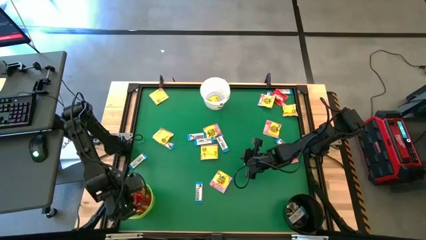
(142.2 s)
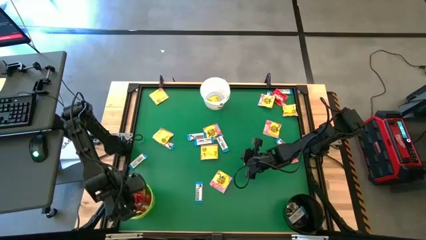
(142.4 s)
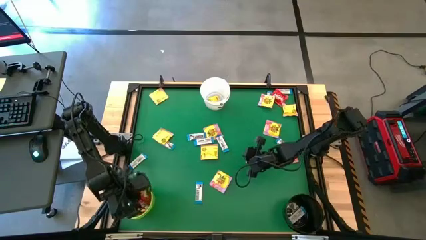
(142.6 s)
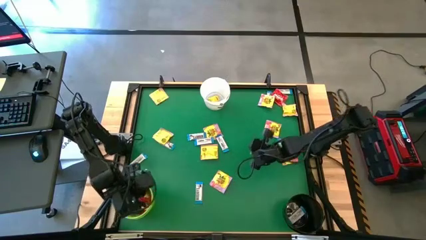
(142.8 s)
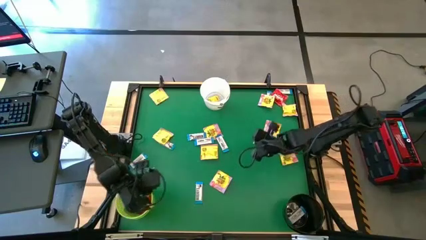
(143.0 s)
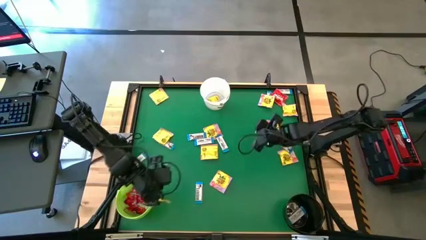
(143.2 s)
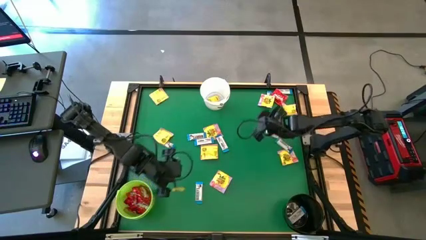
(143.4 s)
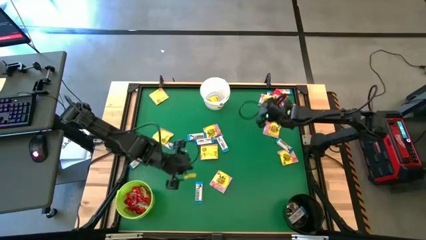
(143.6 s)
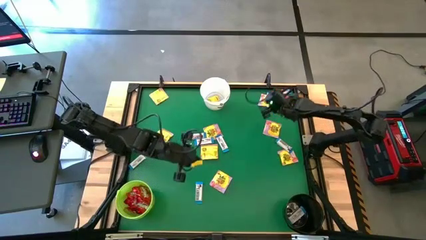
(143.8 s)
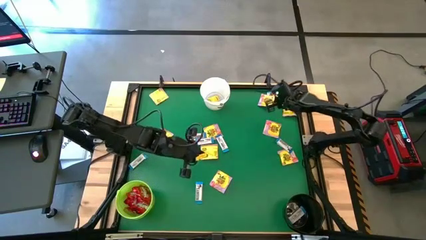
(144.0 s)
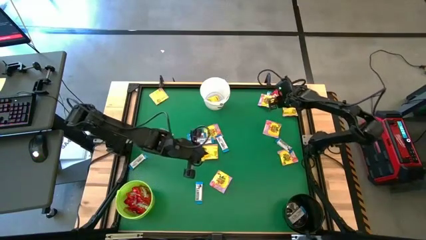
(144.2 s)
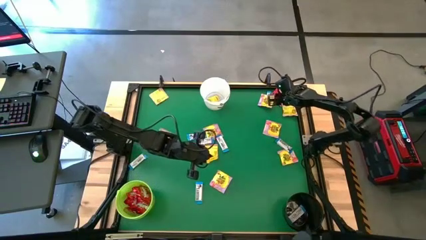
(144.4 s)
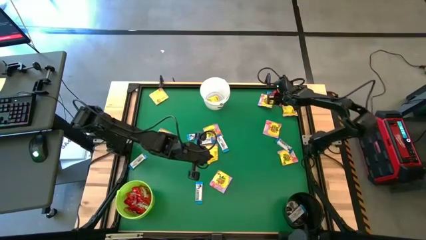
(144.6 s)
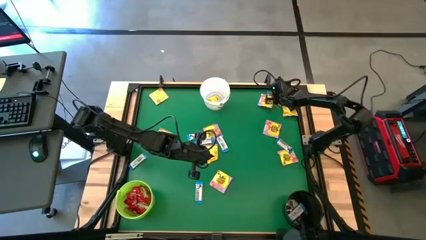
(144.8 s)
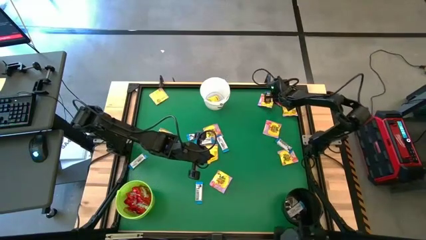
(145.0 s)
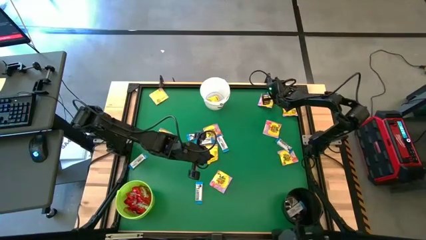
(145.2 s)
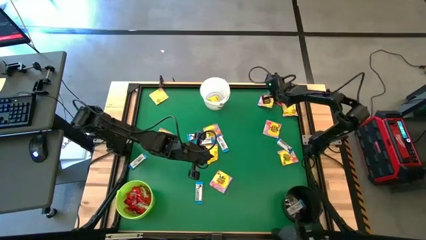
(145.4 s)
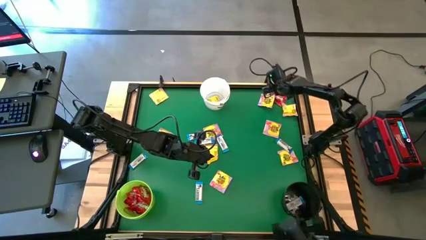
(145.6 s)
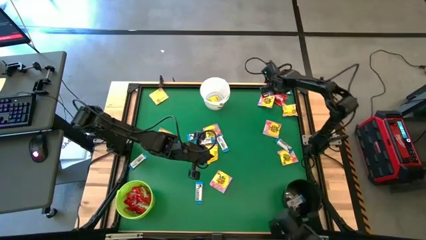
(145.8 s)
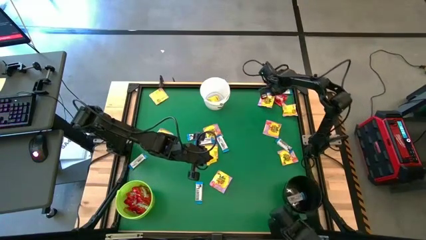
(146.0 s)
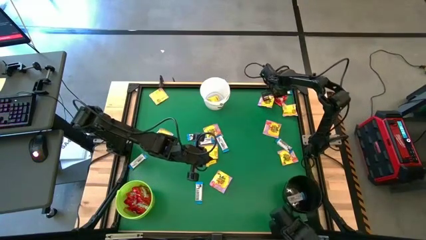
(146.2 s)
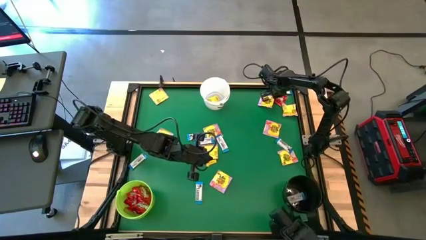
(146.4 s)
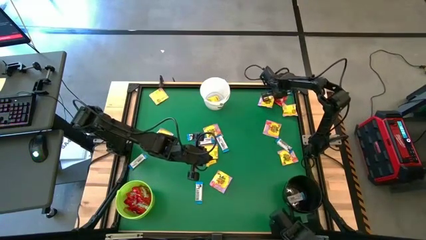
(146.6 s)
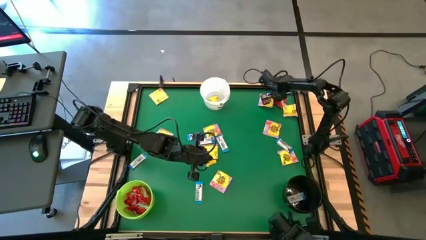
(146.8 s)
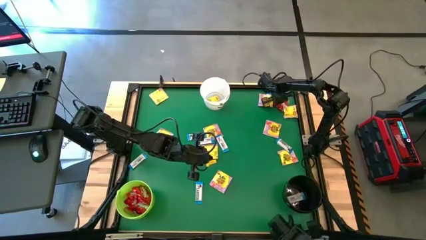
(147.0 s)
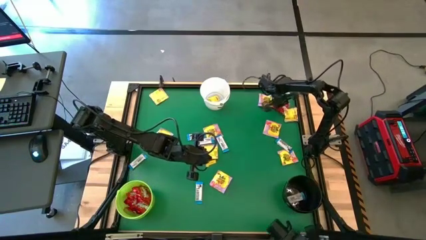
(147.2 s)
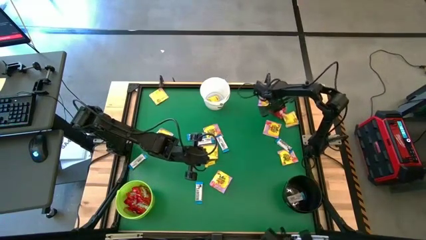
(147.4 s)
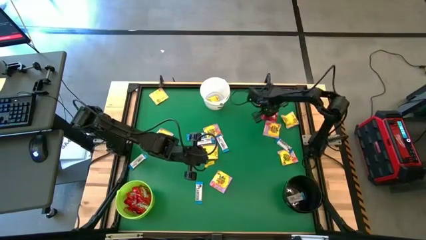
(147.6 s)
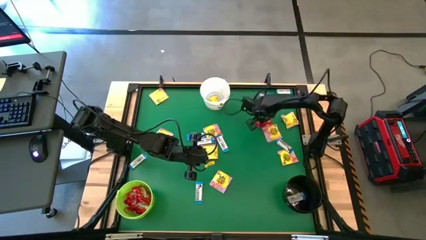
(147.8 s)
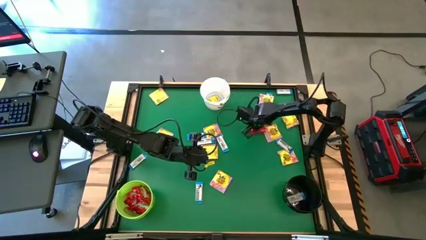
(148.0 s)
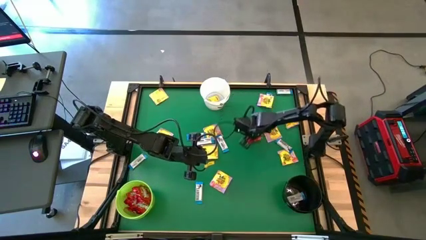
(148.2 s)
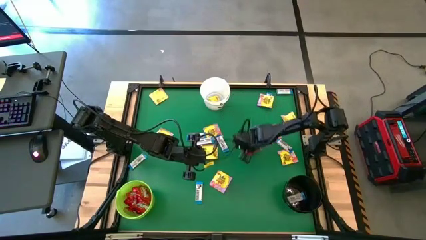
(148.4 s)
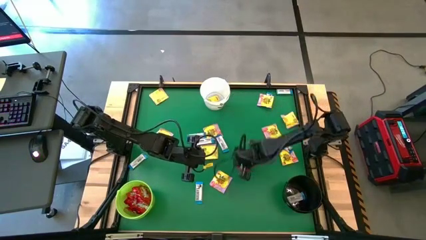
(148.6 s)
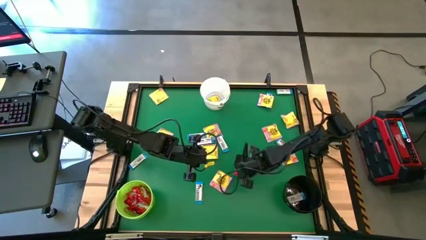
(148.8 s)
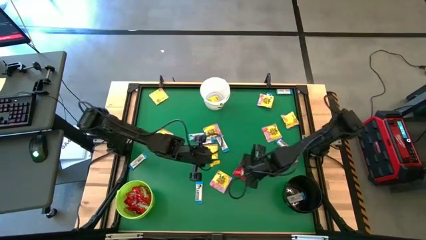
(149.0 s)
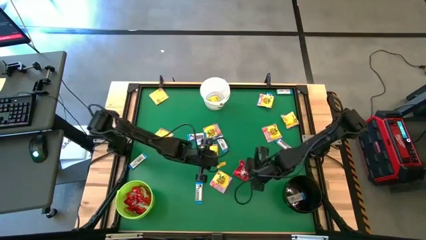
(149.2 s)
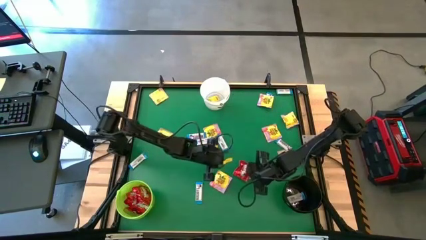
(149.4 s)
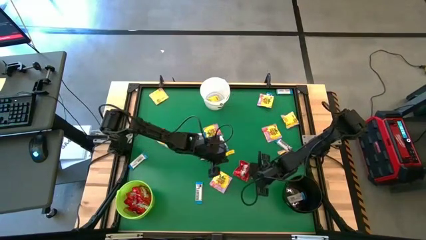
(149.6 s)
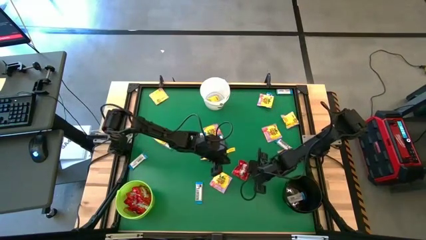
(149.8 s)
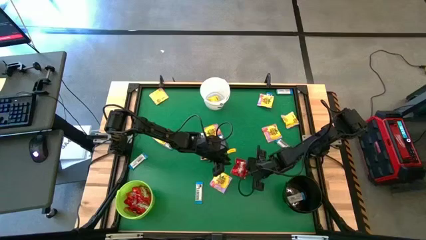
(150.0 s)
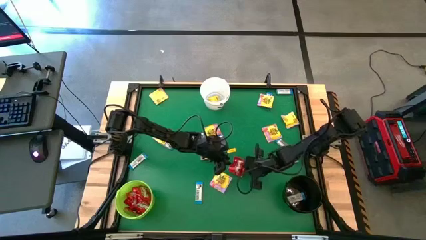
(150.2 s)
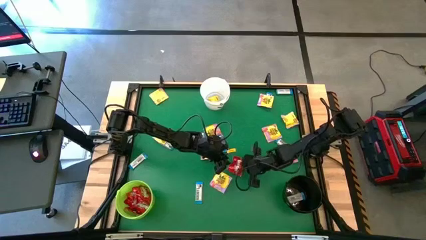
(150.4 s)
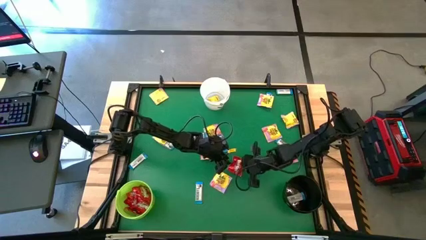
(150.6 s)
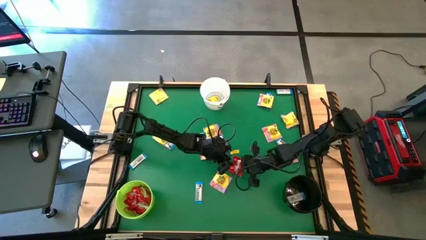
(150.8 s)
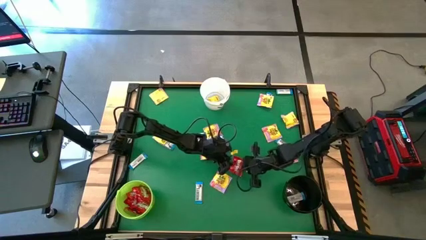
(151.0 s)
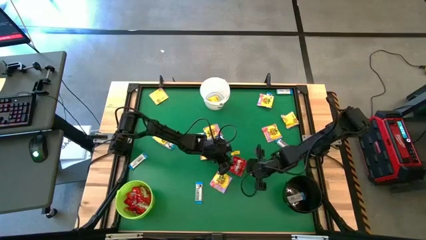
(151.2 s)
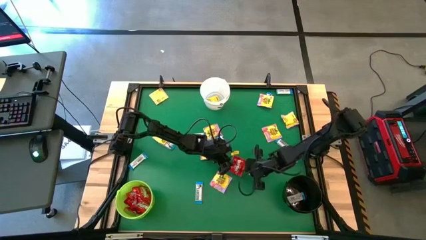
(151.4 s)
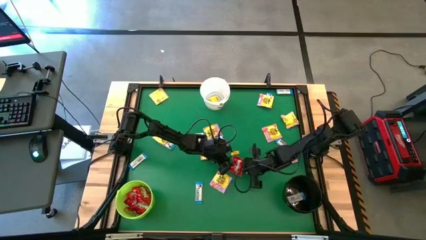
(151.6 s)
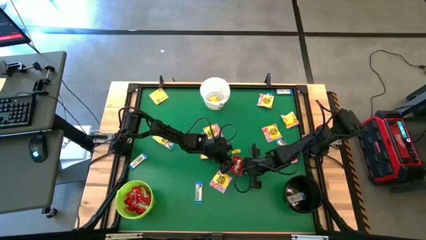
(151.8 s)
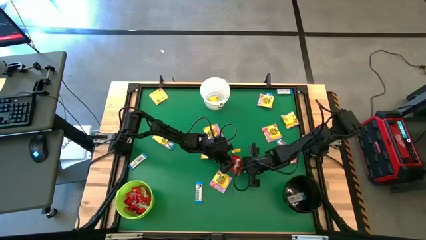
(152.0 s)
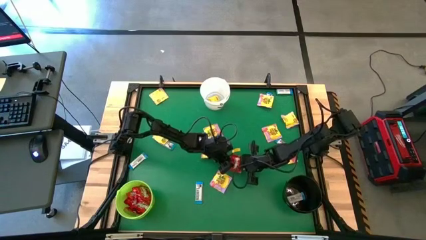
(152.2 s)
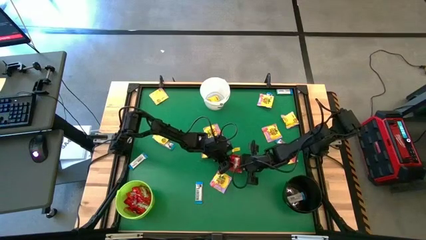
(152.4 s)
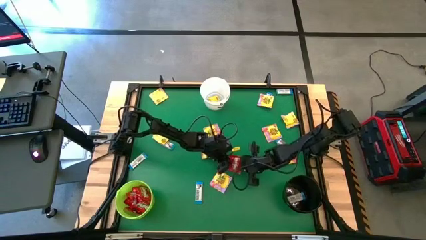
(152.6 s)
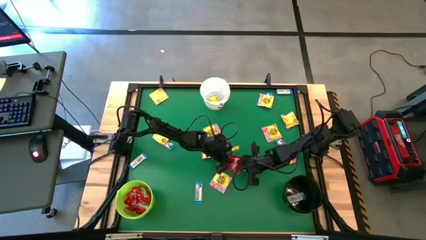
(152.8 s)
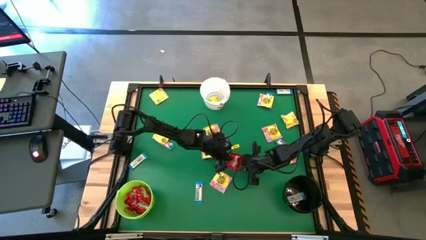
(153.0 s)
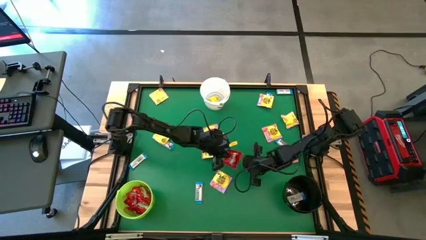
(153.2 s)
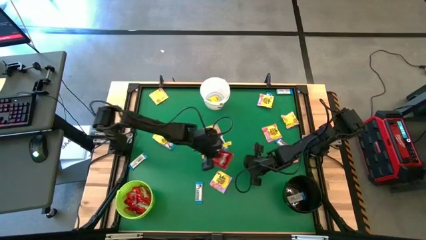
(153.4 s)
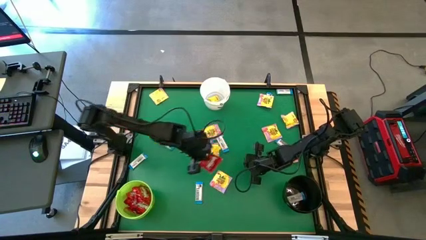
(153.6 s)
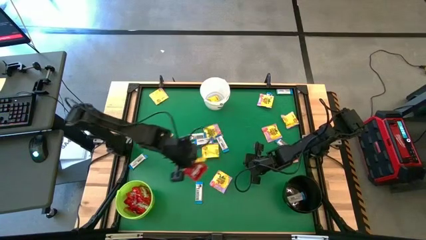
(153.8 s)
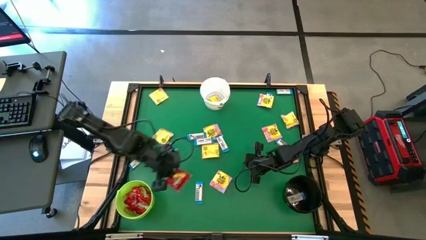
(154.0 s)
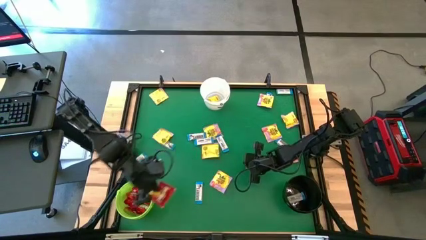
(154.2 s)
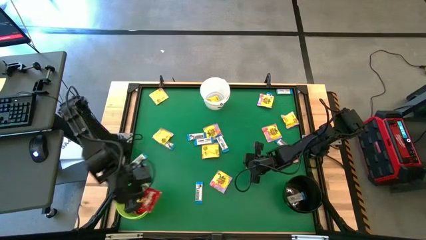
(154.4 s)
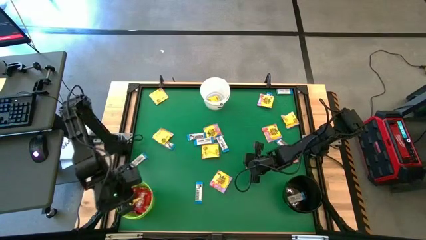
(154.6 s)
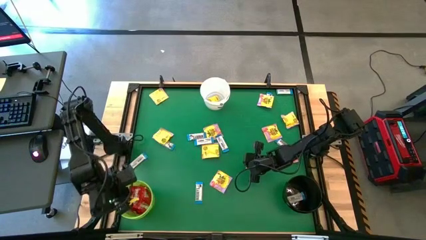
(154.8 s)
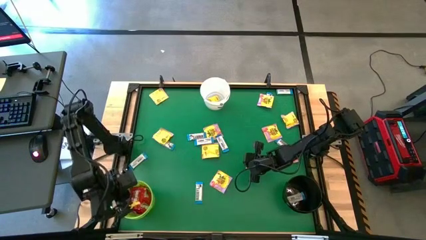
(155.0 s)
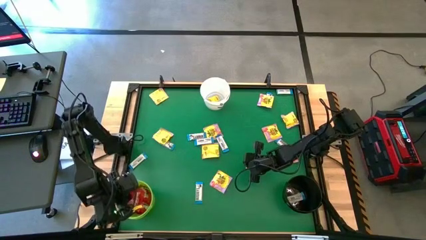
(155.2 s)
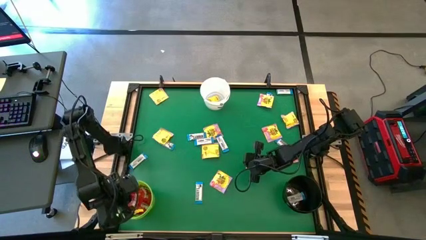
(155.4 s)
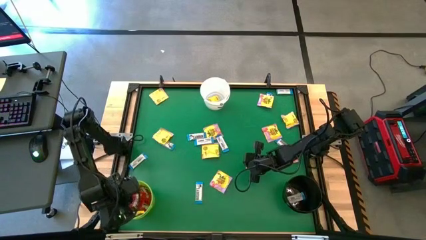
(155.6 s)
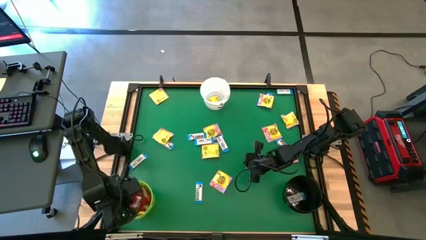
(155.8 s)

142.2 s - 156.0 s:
Task: Sort candy by brand, put in halloween buckets
Put the red candy into the green bucket

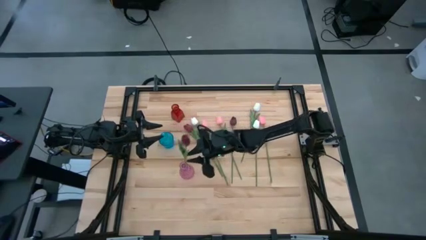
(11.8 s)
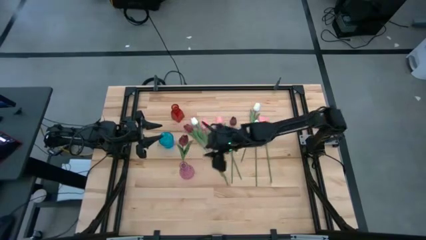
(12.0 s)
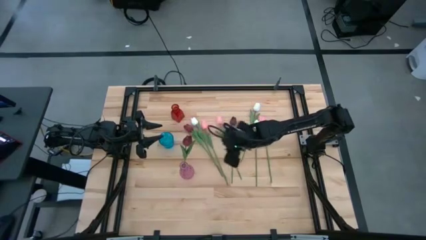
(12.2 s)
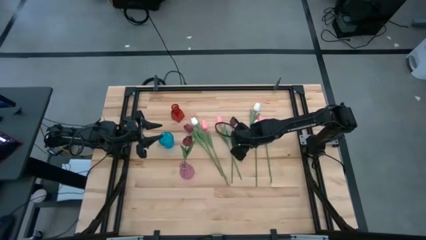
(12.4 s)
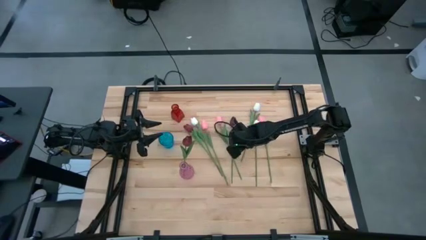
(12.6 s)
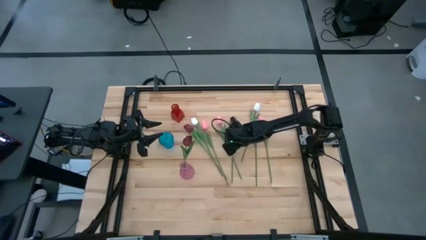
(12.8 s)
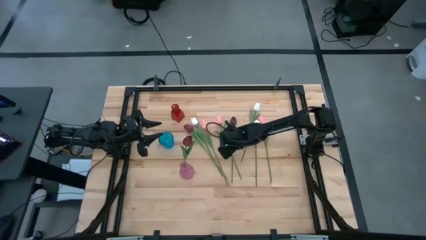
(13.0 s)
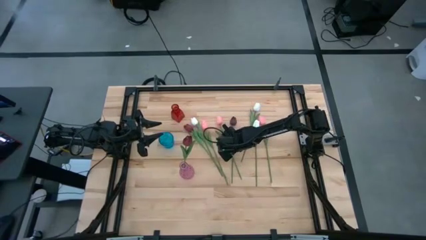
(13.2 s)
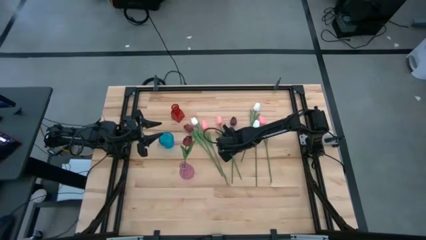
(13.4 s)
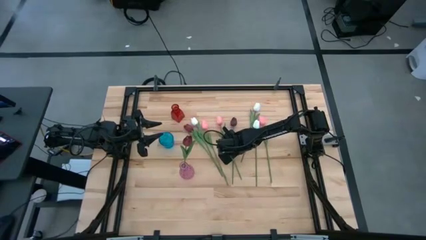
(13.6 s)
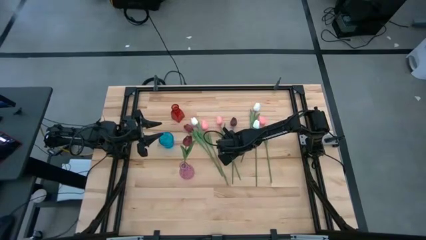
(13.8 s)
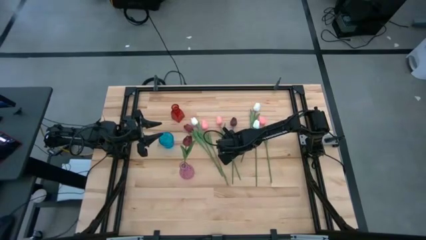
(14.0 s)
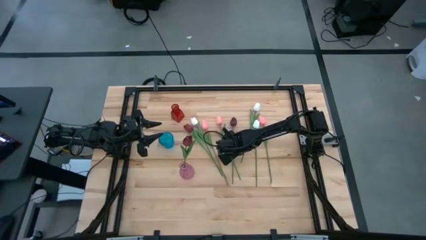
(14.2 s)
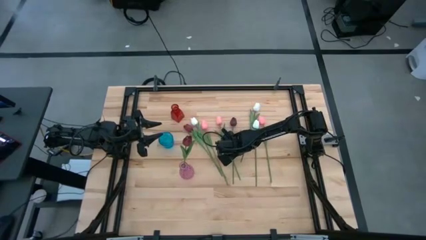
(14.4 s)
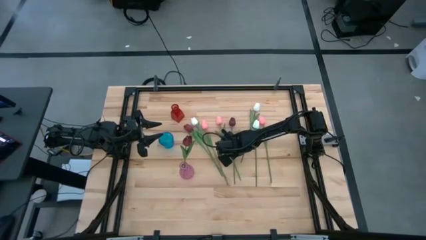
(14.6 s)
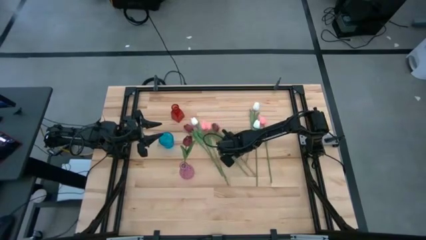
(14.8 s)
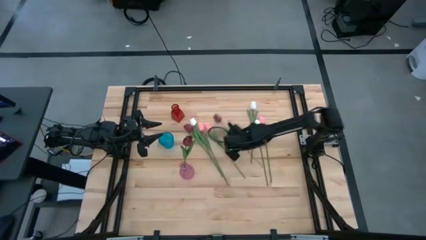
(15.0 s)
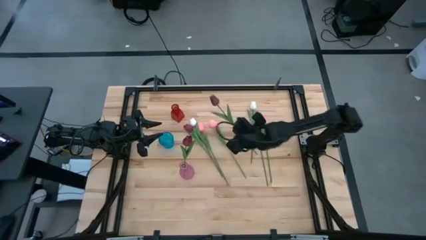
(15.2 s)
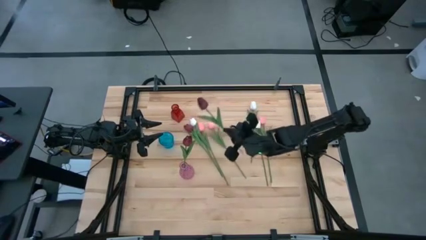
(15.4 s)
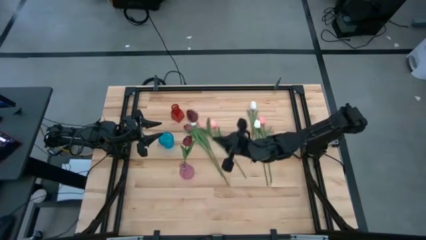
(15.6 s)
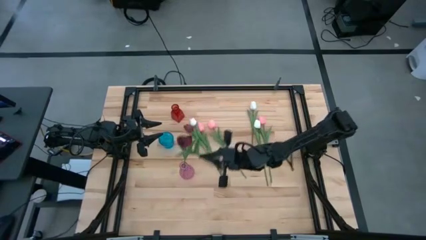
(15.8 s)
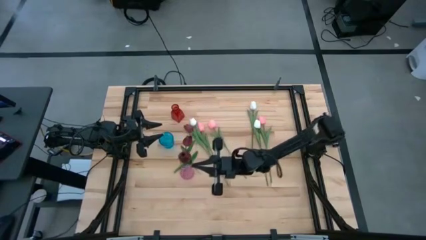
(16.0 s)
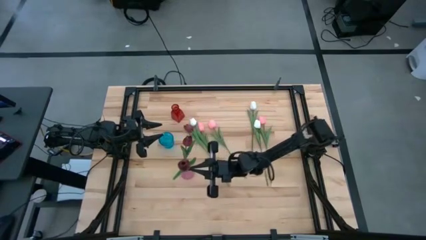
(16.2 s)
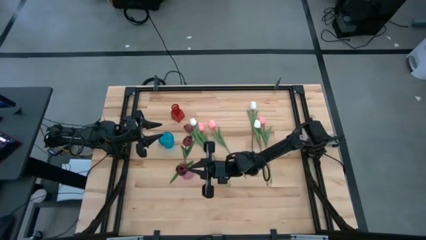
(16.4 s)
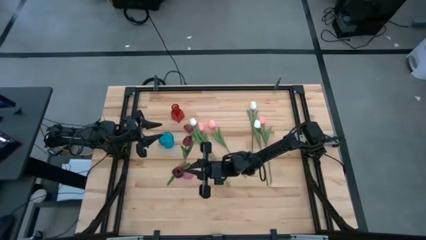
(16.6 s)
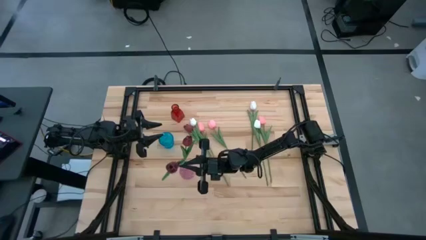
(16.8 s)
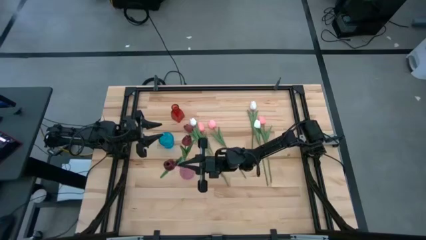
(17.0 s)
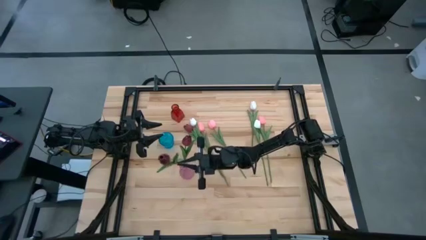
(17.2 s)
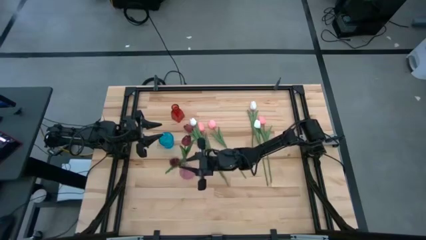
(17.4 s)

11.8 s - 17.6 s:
Task: Sort flowers into vase by color
Put the right red tulip into the pink vase
